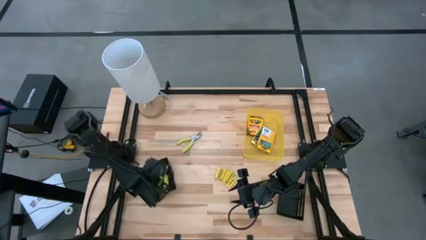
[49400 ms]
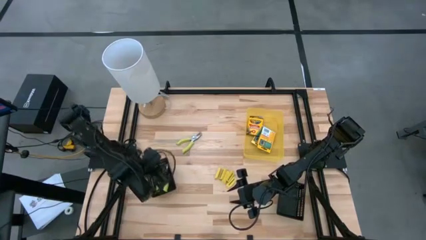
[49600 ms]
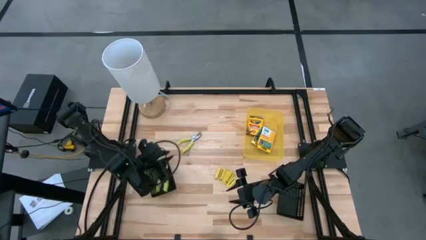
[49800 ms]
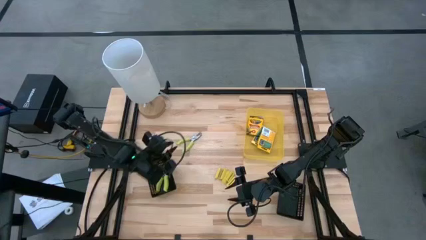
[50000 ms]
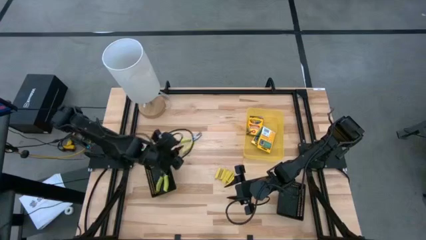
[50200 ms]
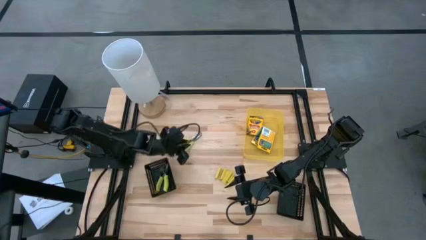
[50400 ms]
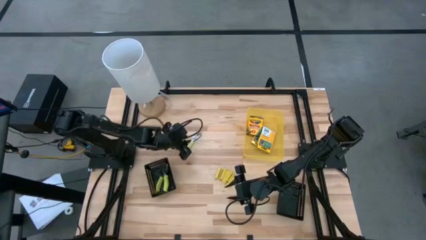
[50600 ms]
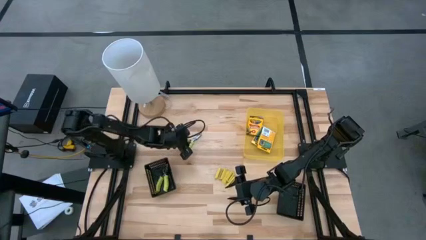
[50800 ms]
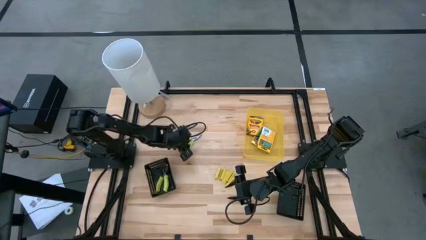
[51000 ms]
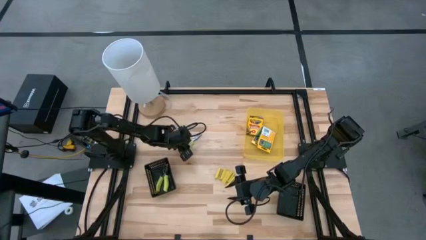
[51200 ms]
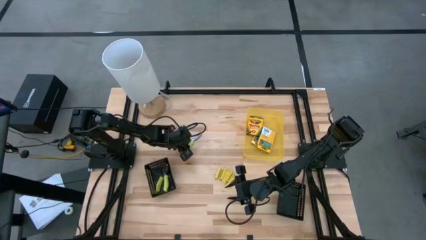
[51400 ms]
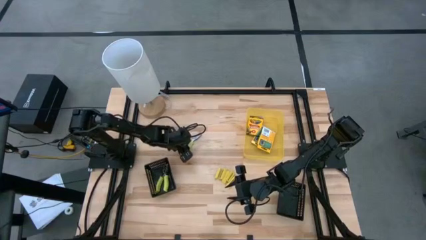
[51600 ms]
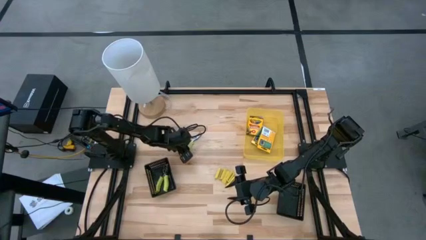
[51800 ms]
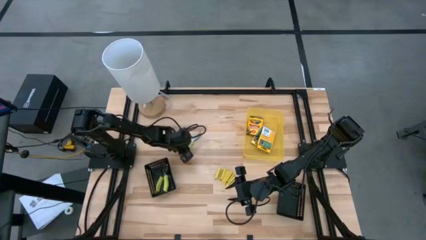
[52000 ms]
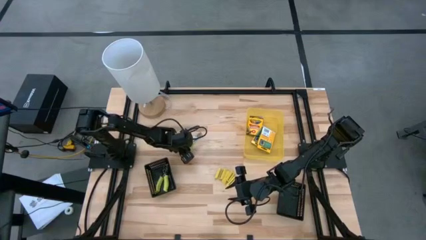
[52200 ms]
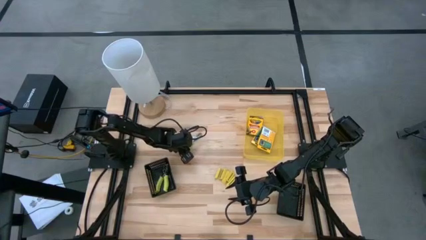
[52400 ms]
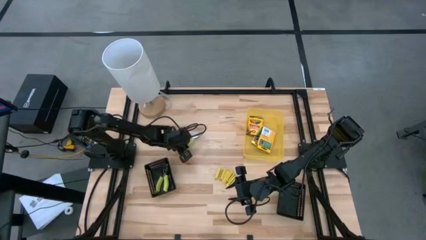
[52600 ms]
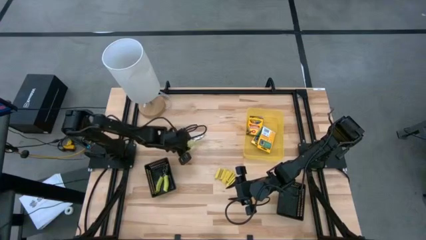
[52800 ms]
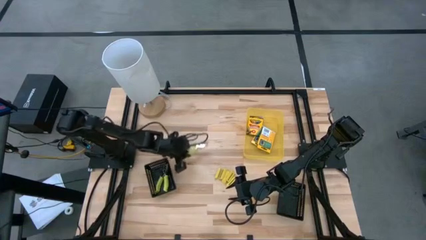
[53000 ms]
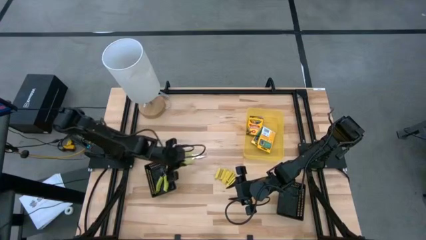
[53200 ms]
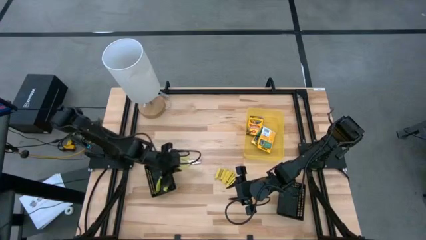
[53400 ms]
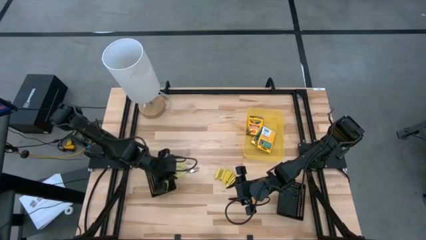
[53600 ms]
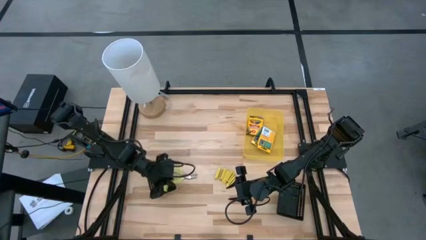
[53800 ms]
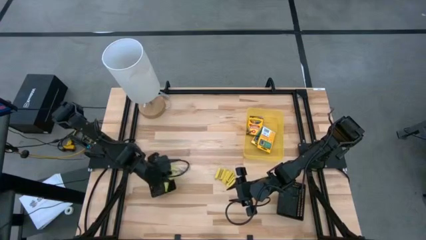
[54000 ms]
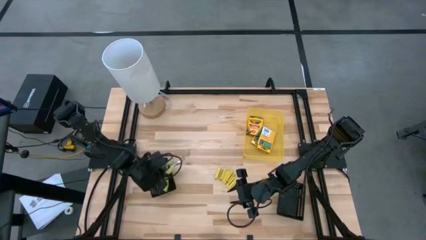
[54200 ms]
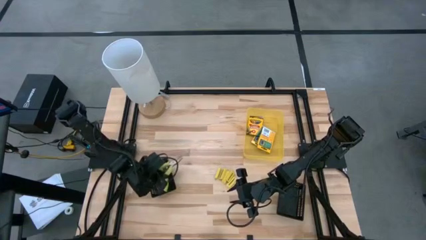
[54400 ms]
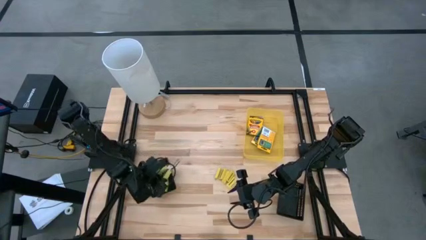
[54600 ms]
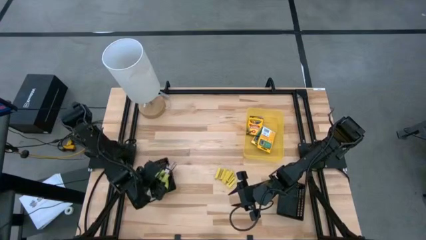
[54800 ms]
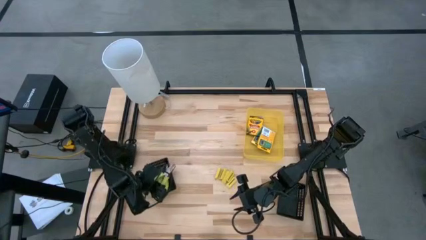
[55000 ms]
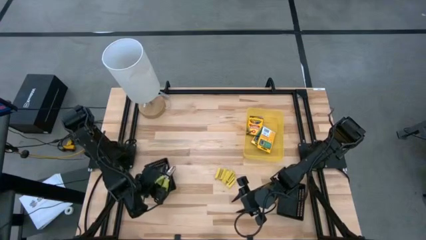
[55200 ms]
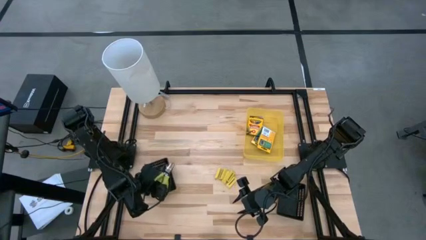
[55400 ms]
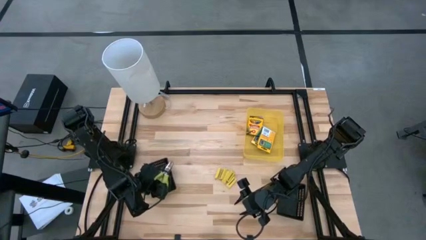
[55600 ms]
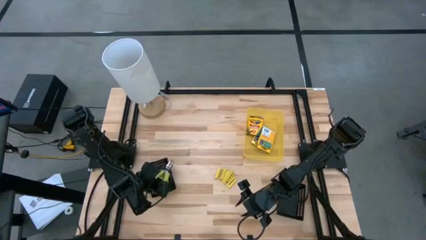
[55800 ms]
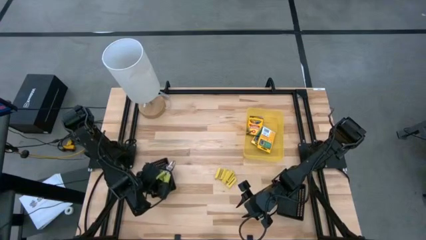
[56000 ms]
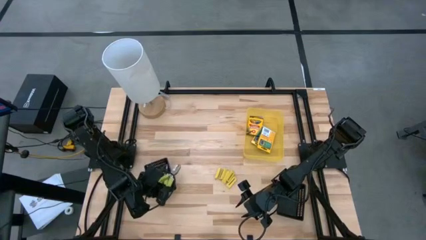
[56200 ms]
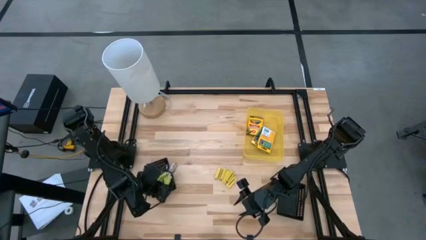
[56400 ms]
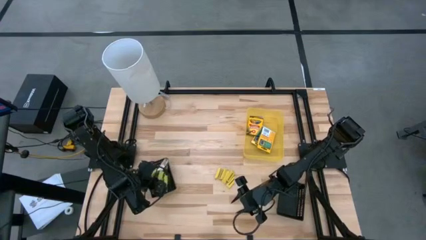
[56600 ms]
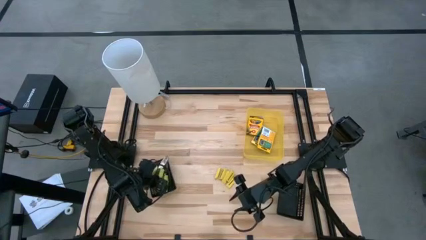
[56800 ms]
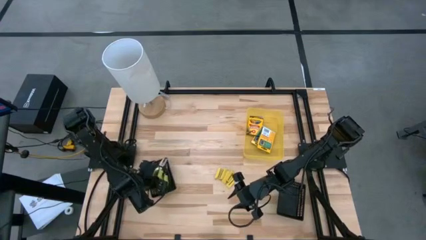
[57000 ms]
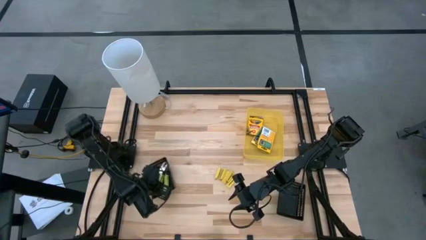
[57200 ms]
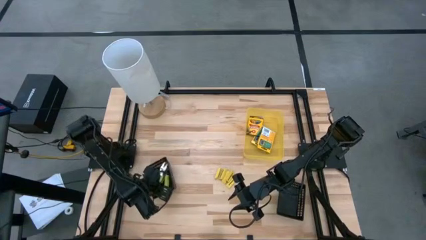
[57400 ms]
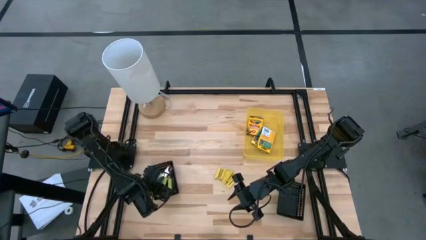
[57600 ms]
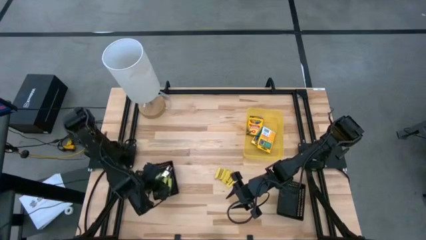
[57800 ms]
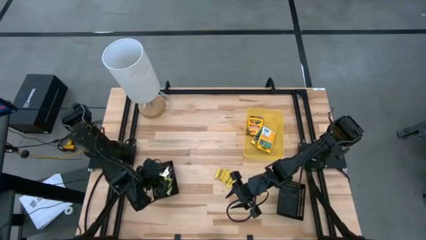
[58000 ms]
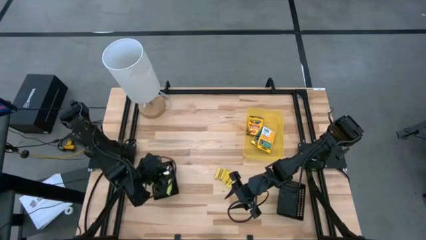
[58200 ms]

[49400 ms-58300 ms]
Task: Pick & Place School Supplies
Put the green single hole puncher into the left black bin

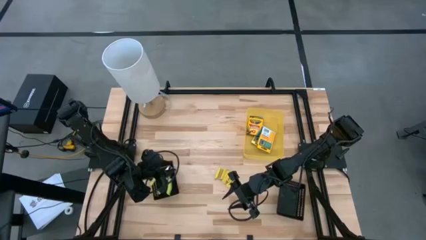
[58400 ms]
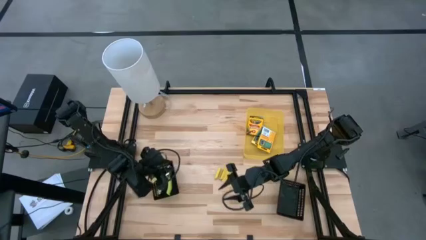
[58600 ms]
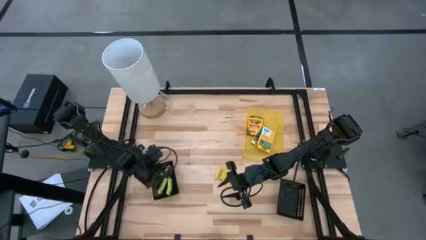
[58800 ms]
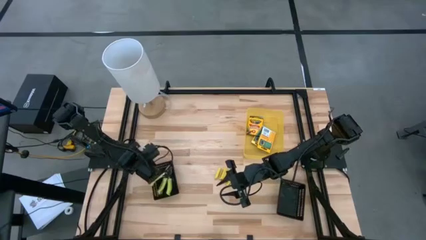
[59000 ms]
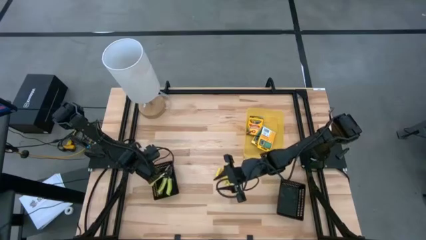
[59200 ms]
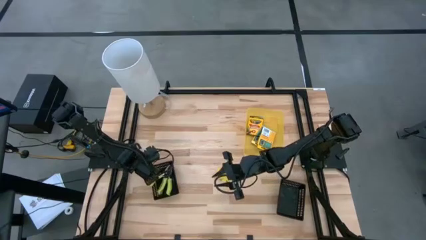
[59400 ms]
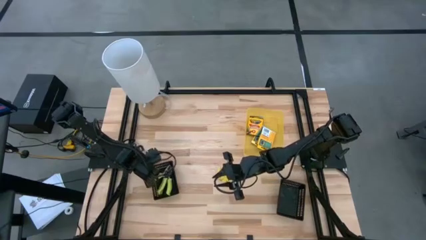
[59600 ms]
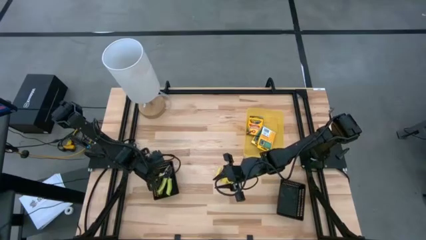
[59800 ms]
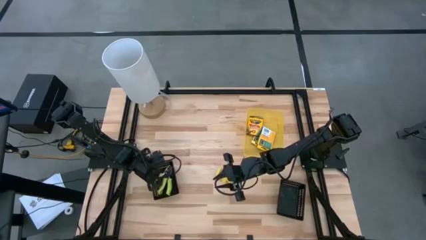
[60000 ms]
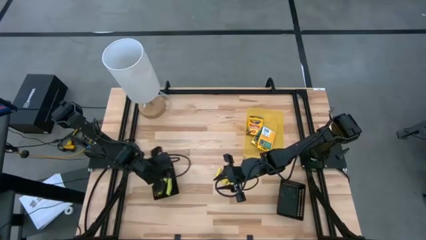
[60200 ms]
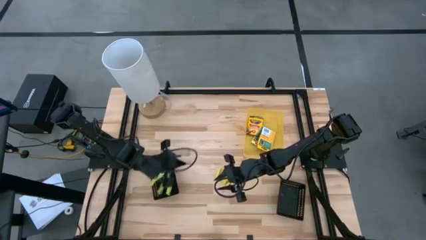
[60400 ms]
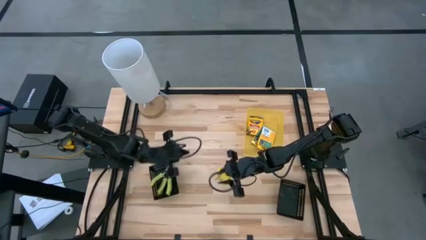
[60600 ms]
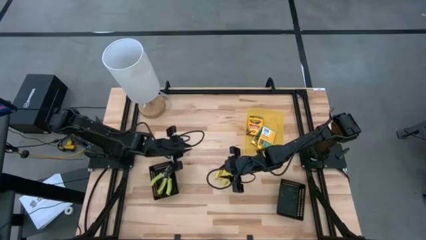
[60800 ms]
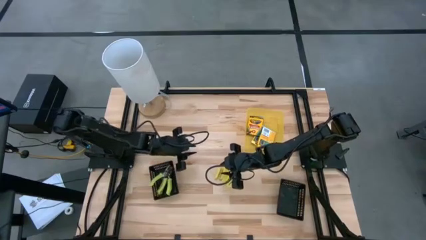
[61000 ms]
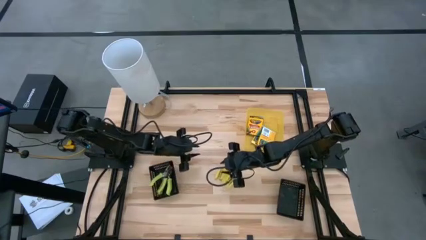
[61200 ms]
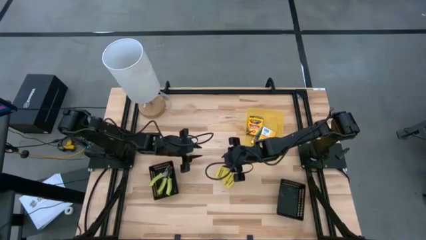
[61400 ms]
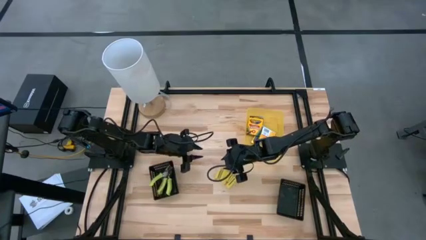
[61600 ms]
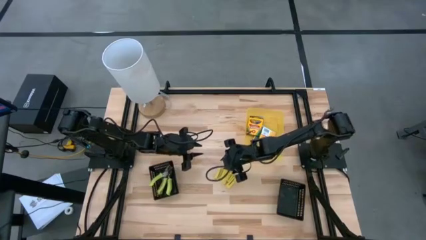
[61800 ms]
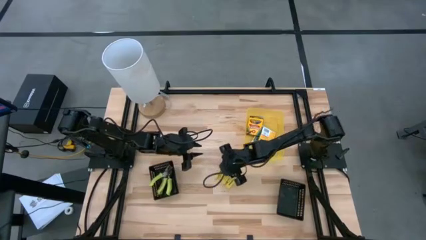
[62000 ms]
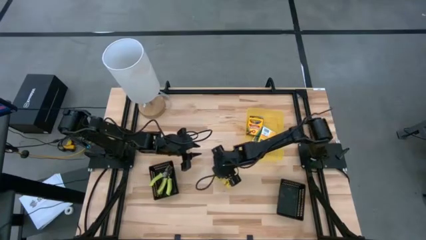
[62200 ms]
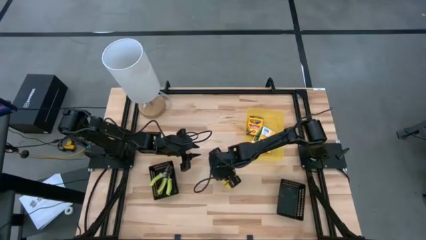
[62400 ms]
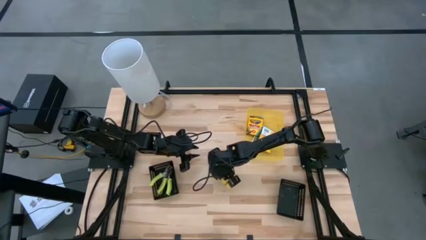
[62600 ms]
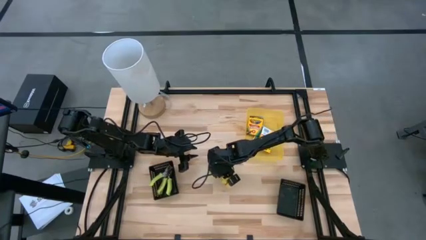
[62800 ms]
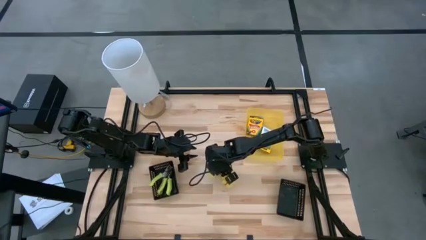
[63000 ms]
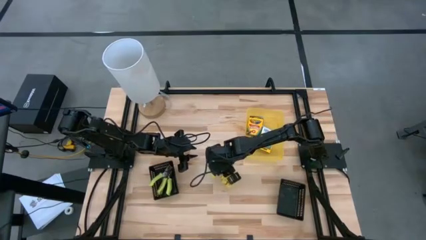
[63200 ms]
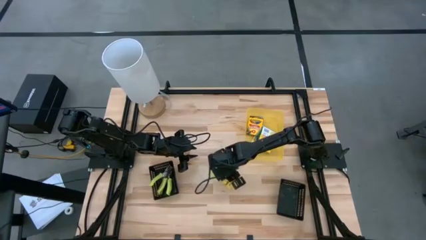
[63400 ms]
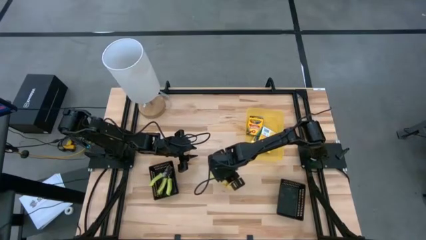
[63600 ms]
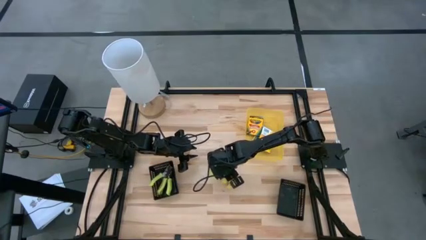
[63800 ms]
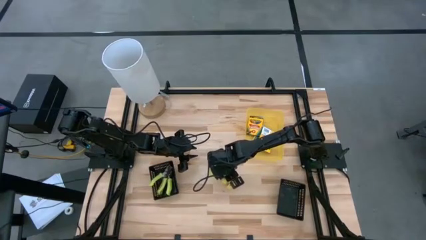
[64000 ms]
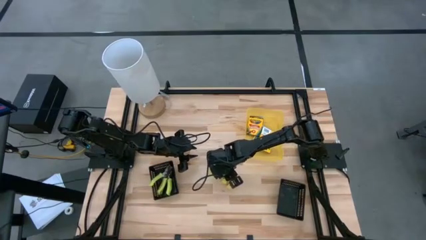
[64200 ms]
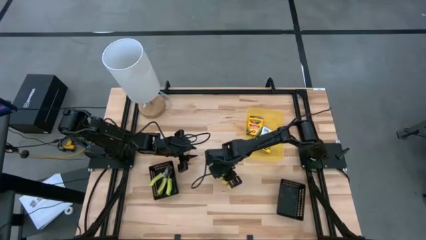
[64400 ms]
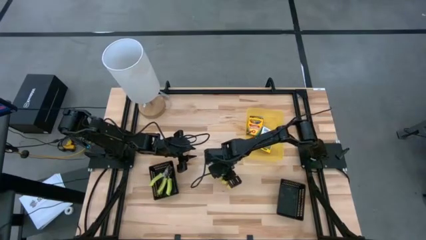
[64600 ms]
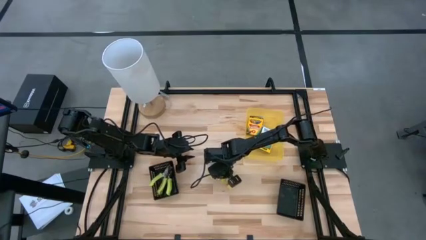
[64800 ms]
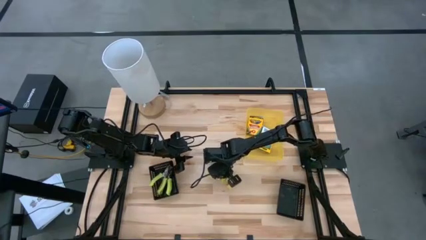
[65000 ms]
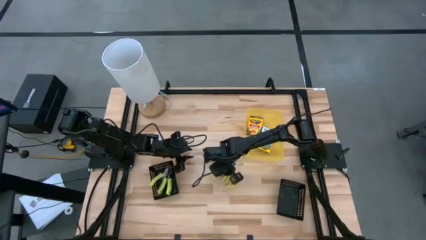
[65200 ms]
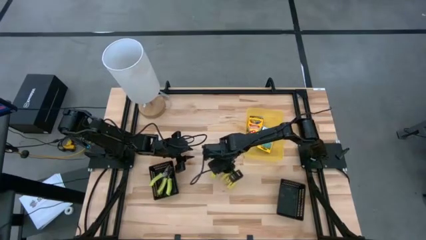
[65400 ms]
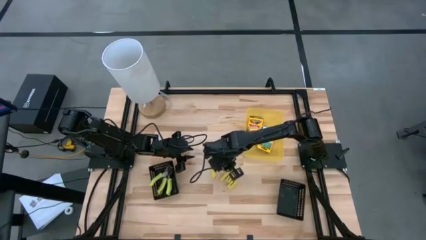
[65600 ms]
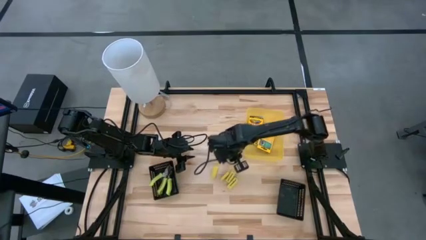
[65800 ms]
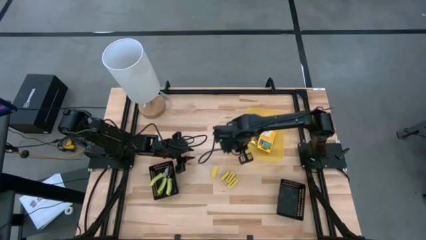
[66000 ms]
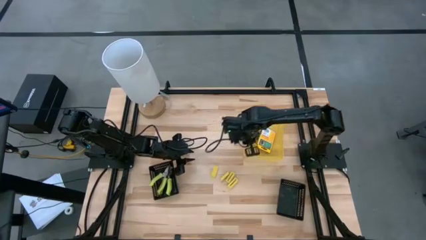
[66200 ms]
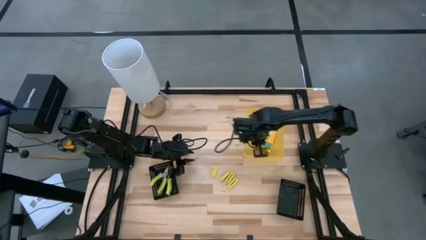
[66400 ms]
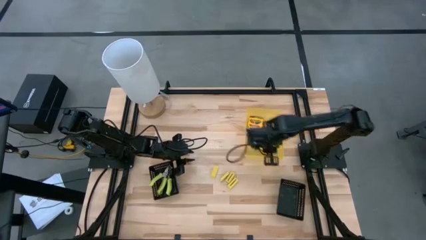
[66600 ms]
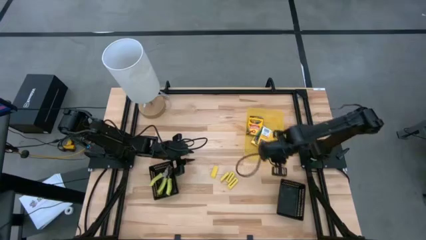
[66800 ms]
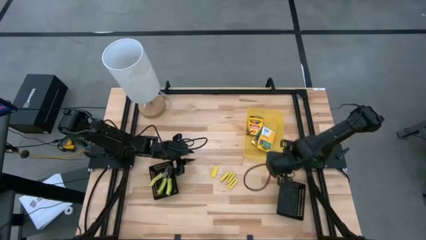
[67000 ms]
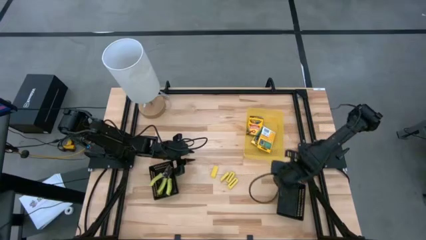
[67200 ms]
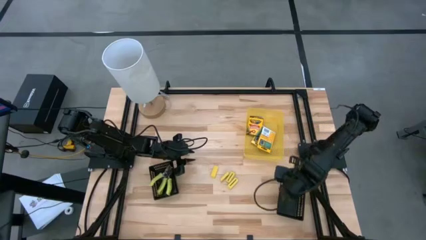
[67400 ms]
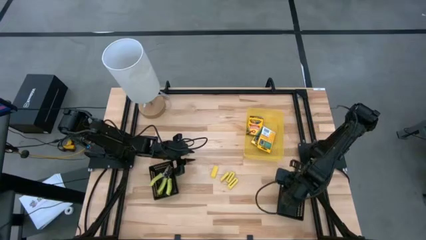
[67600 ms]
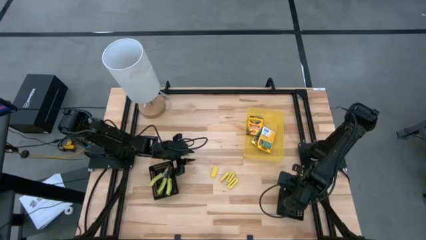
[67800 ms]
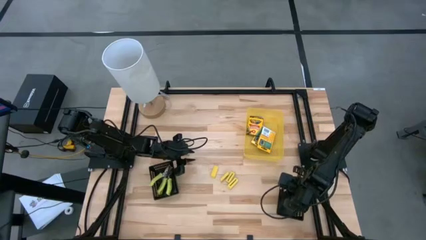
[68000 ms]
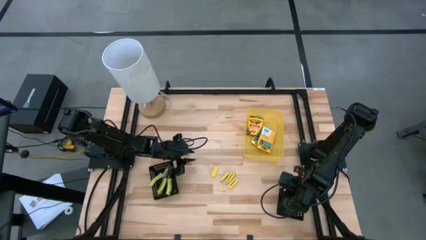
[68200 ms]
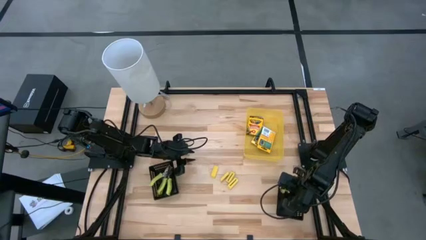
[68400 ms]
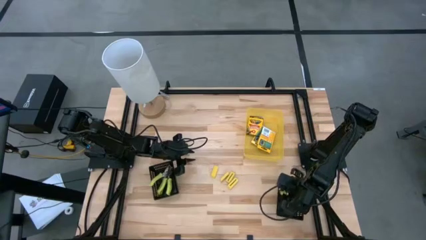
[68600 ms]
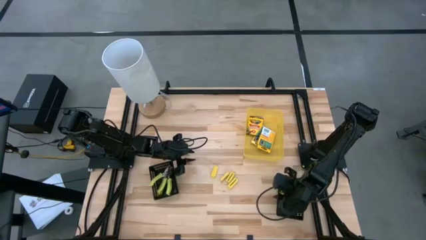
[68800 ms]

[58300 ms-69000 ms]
Put the eraser into the right black bin
